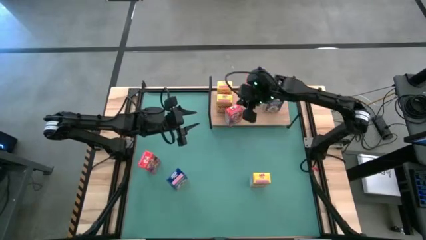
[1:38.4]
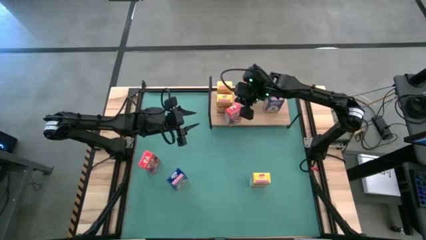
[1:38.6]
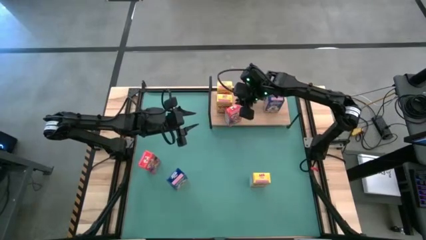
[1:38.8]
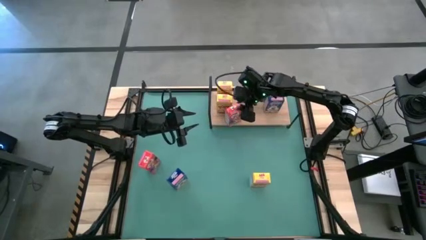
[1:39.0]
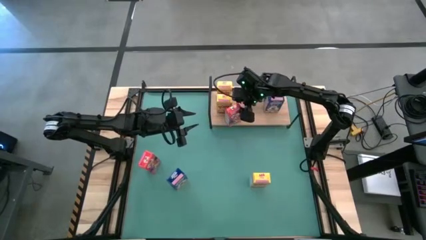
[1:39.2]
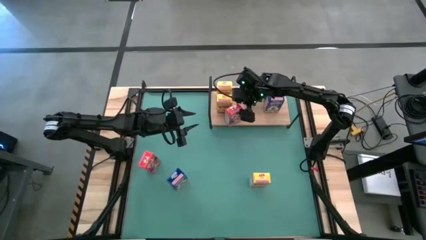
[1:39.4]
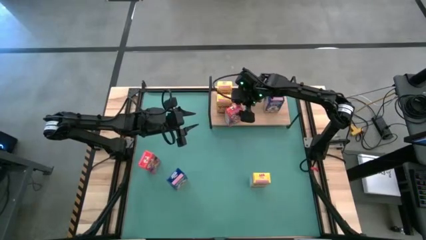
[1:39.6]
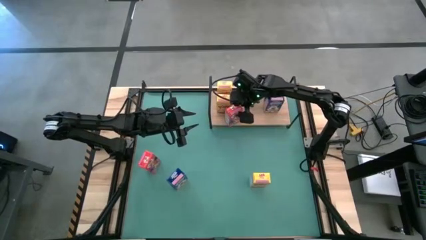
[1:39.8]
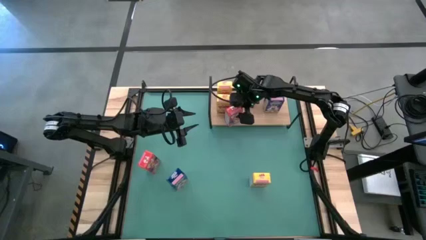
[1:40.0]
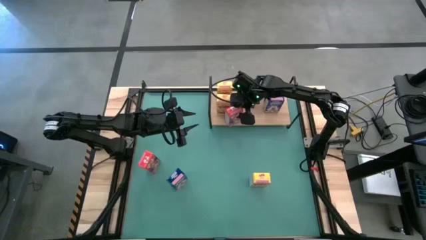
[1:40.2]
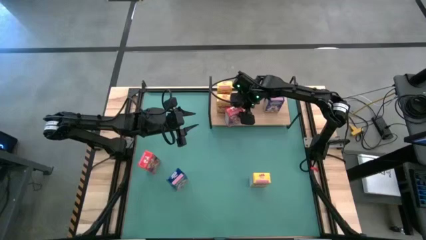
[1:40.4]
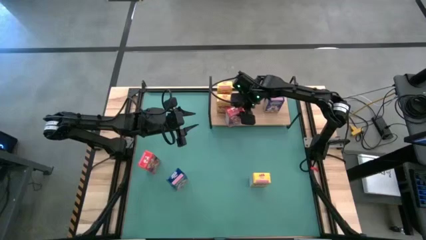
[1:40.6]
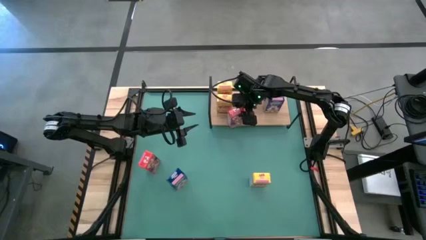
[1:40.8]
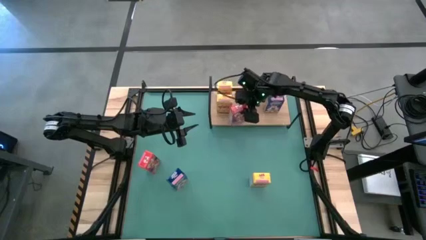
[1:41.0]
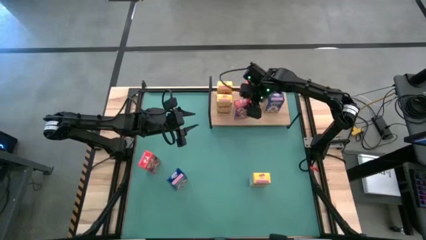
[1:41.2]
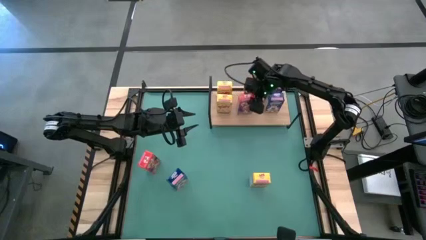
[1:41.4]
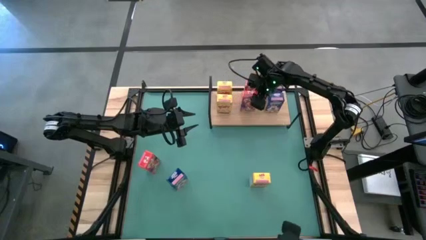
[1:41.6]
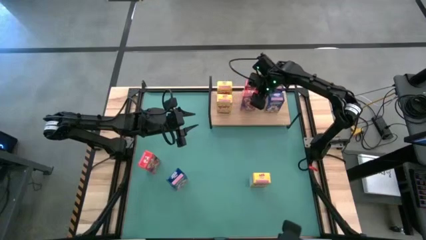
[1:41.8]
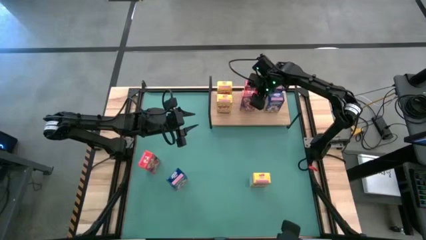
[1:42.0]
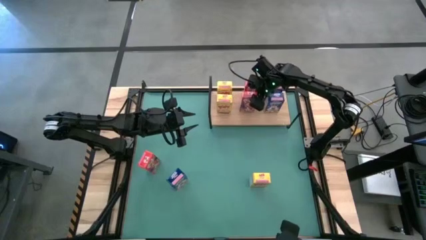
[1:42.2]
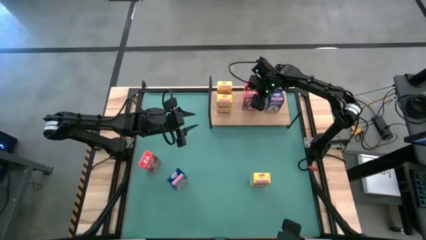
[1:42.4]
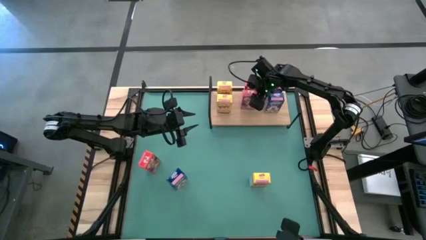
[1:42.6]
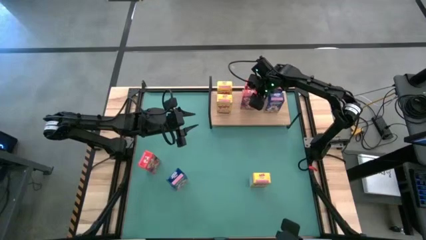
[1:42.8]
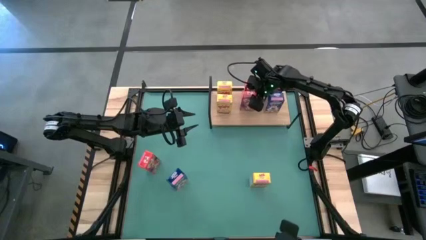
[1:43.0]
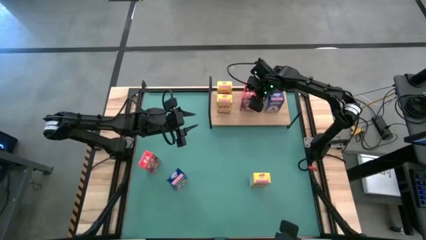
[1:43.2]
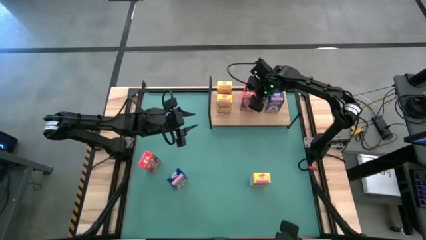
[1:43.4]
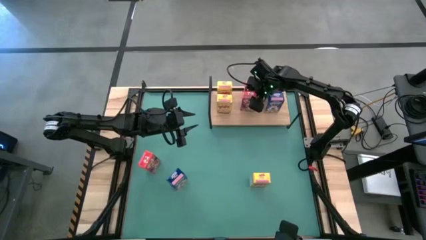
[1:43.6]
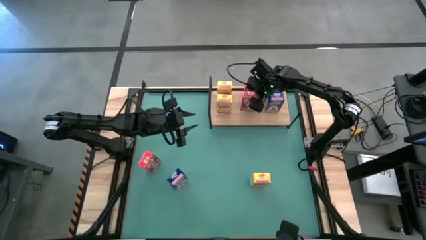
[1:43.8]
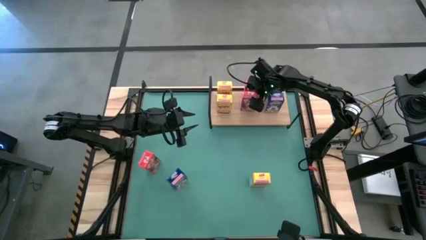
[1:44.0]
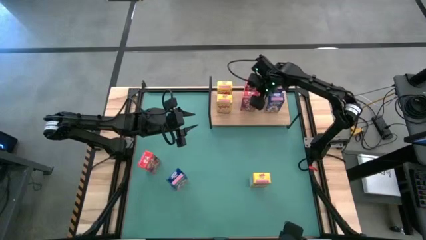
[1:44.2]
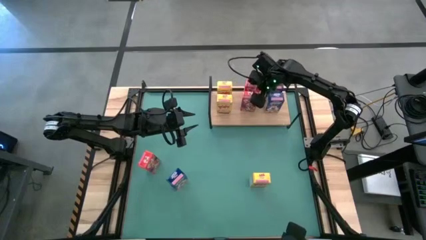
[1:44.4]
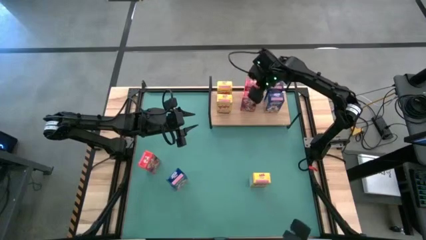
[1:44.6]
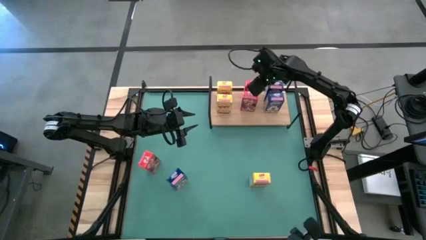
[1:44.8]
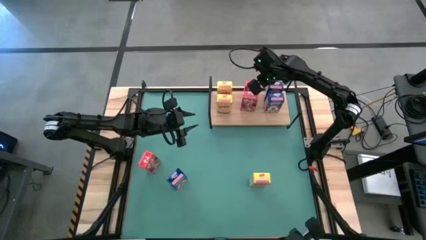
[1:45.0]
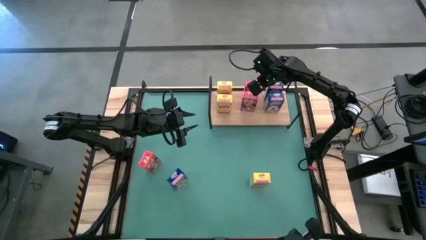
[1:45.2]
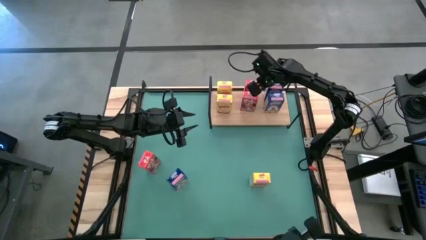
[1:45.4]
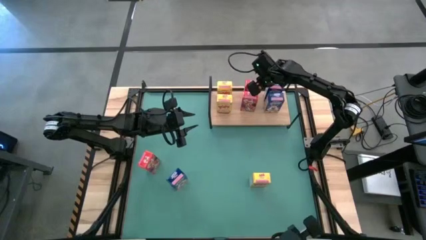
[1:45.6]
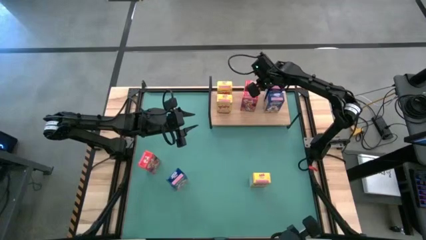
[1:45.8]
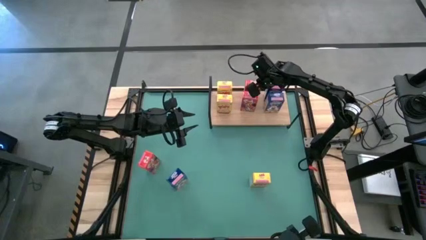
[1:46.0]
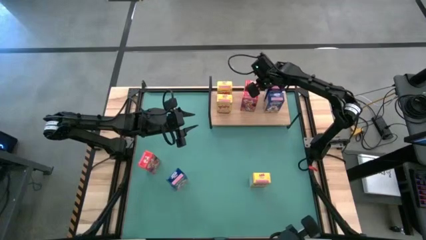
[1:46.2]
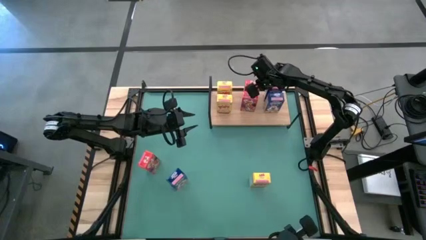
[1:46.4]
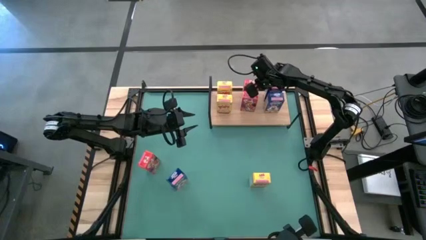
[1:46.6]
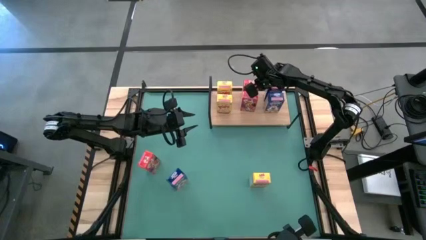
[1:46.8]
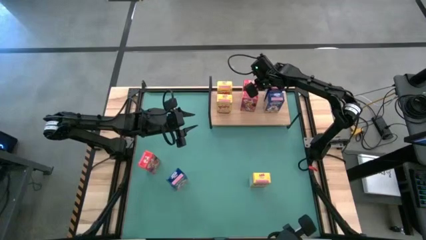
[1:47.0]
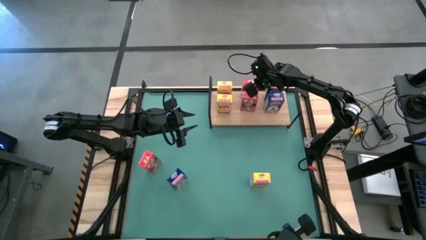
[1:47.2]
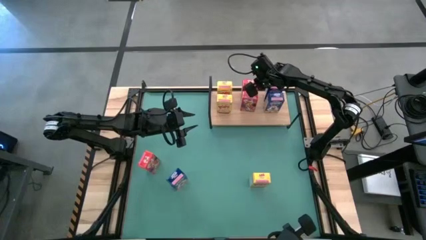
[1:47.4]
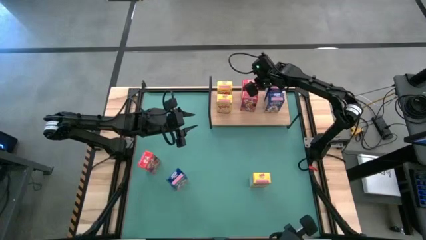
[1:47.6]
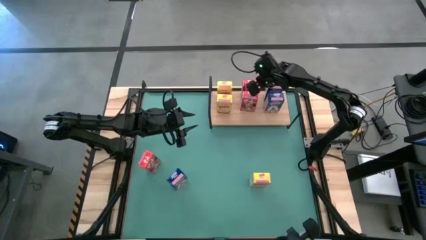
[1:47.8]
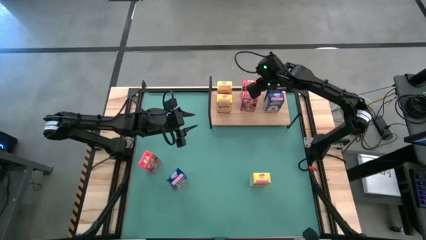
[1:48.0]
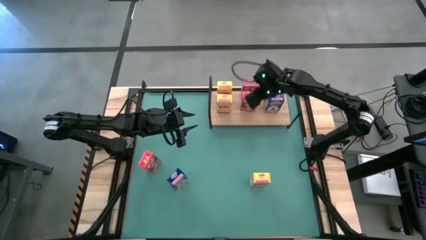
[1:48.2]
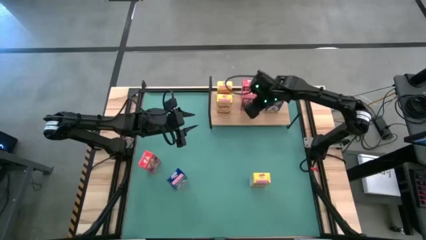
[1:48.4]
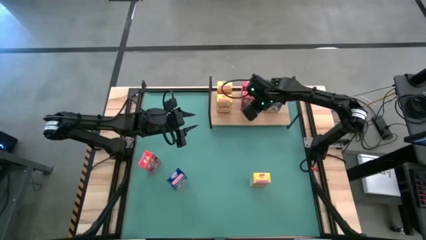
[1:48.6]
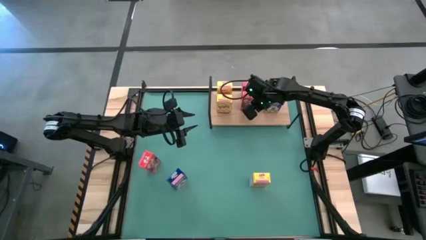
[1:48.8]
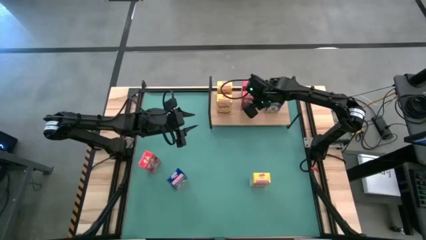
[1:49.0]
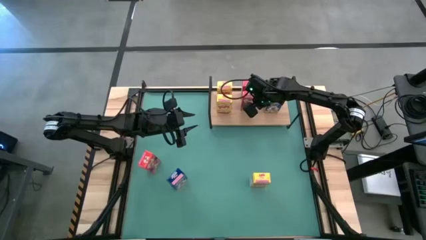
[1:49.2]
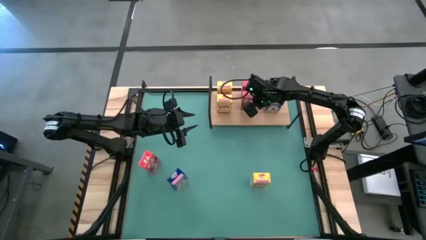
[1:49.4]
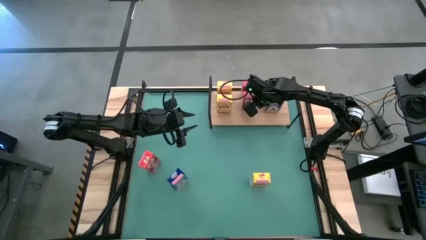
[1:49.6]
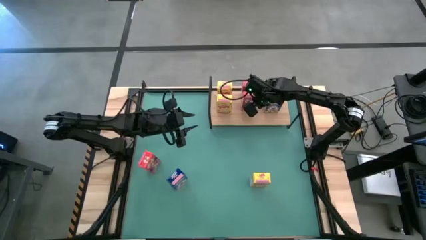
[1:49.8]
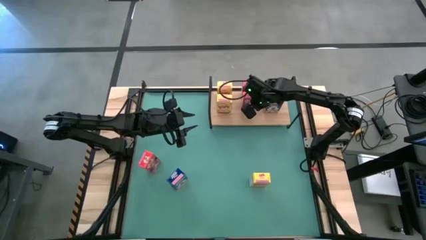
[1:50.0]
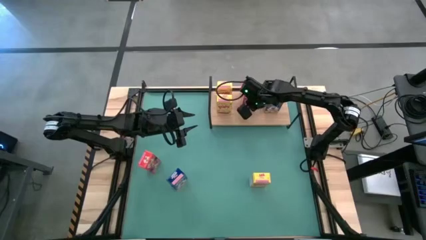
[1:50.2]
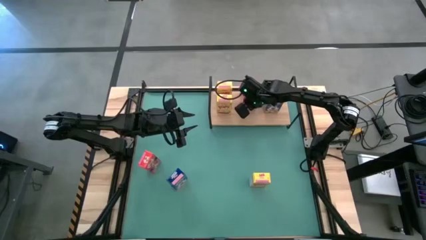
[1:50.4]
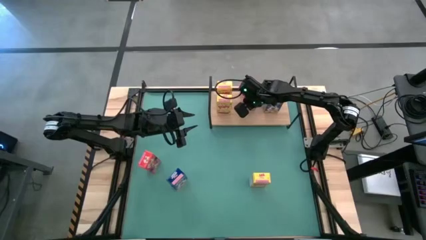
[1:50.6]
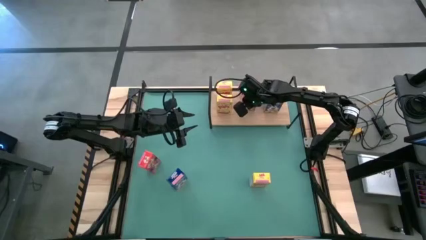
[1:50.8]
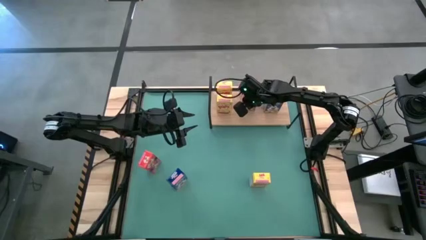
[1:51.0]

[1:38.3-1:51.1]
Task: Stack cereal on shelf
Put the top red cereal box on the shelf aligned with the other red cereal box
